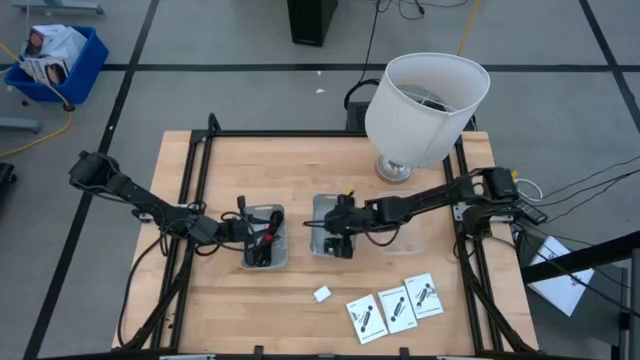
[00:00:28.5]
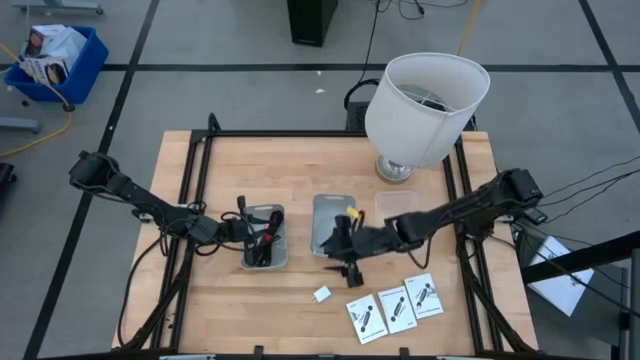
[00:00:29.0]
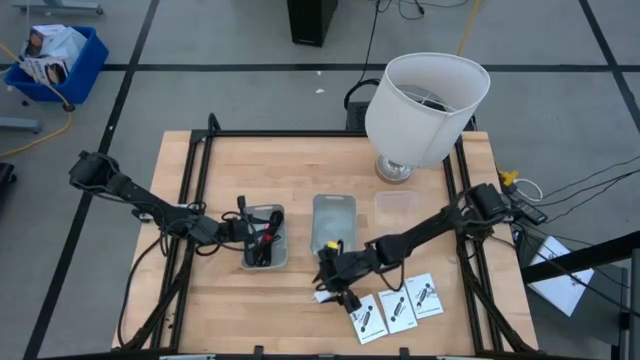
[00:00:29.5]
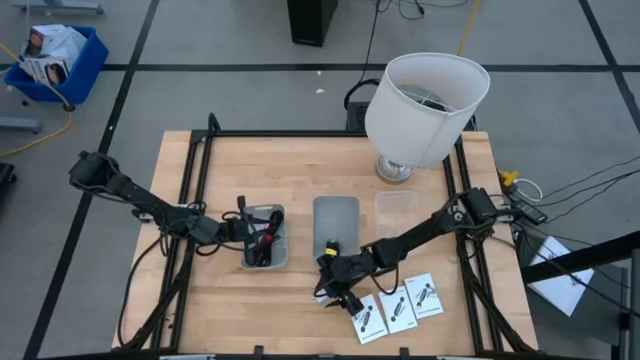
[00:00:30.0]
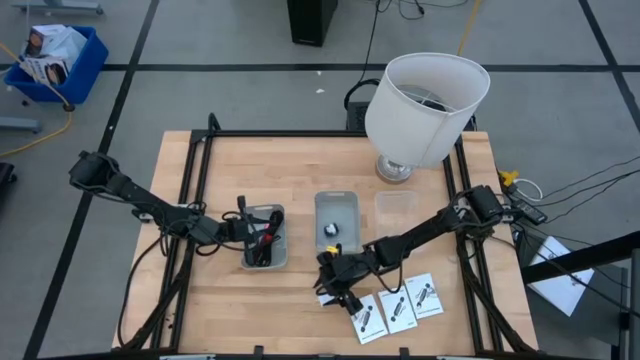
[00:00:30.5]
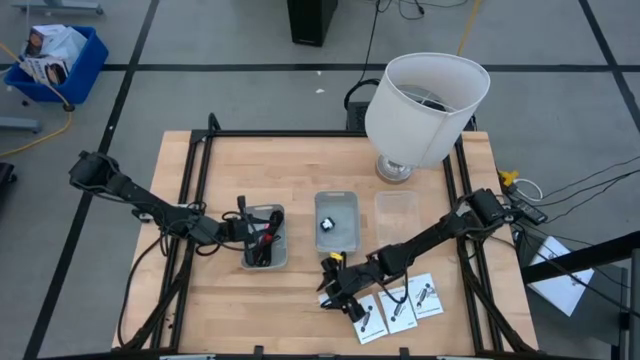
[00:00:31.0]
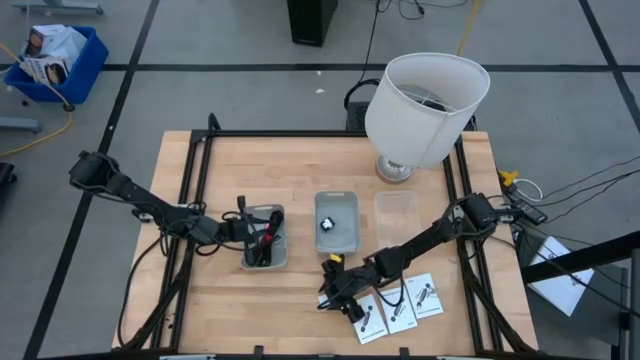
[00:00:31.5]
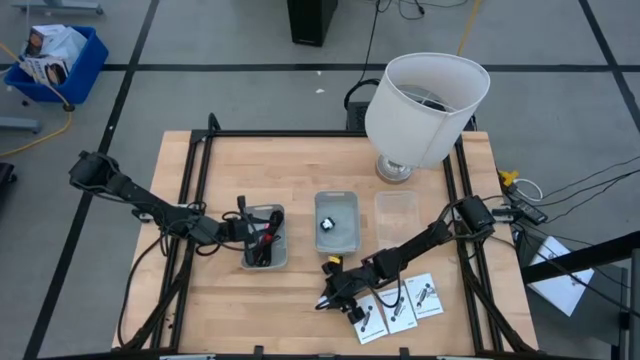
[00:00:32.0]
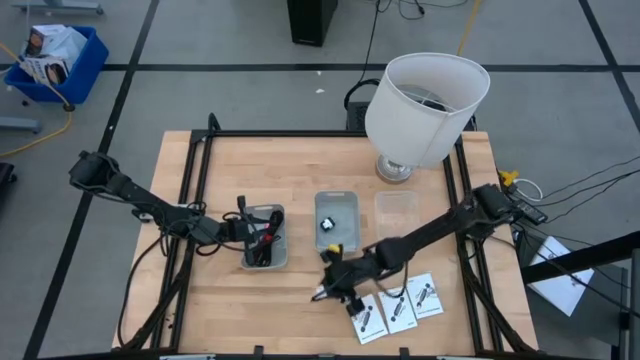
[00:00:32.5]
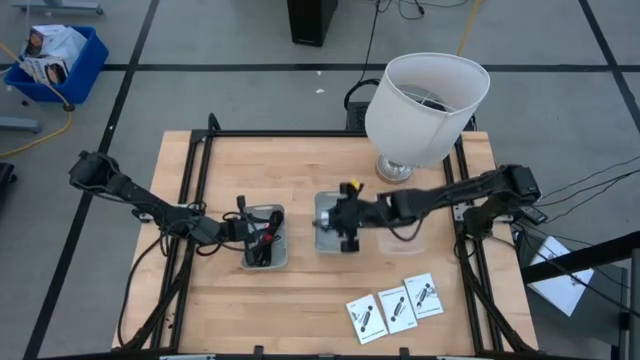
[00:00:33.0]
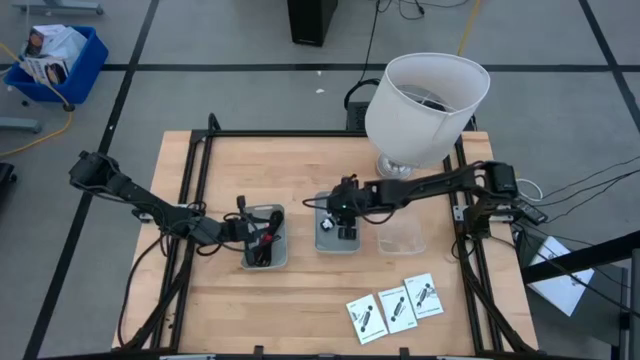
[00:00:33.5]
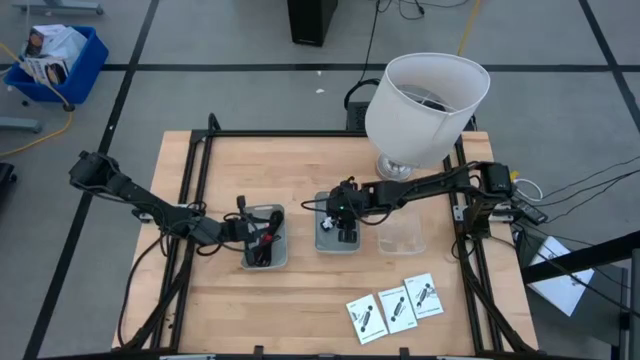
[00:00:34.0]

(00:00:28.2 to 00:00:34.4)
Task: Pick and place items into bin
Put the white charger adapter into the right gray bin

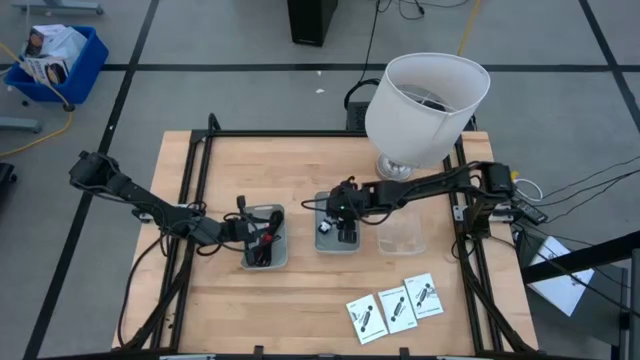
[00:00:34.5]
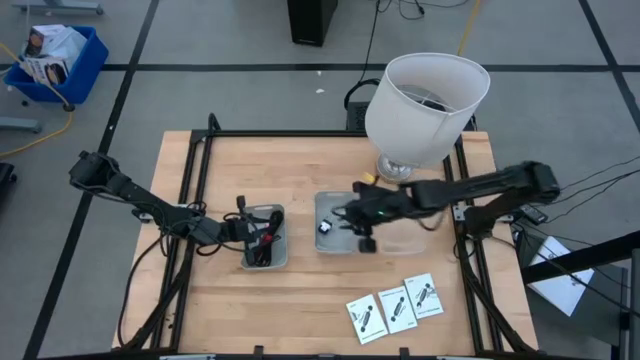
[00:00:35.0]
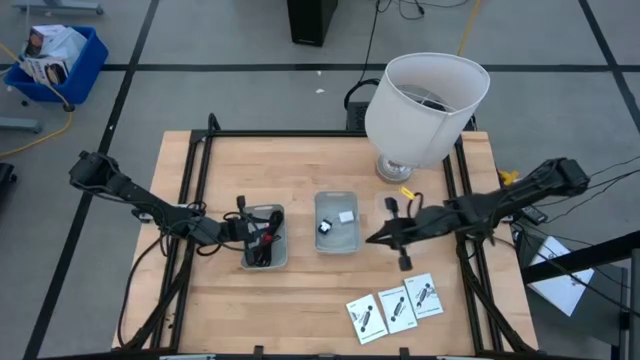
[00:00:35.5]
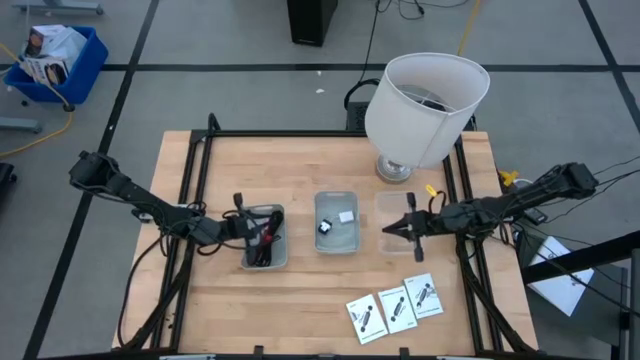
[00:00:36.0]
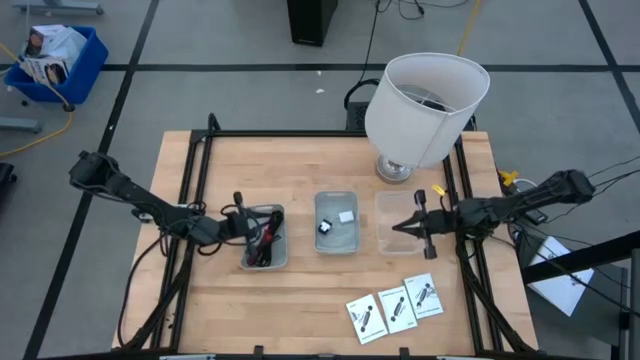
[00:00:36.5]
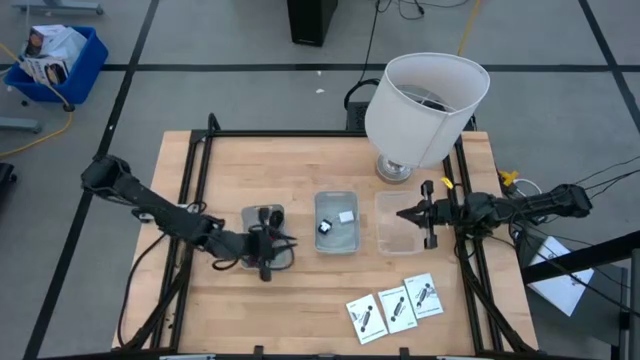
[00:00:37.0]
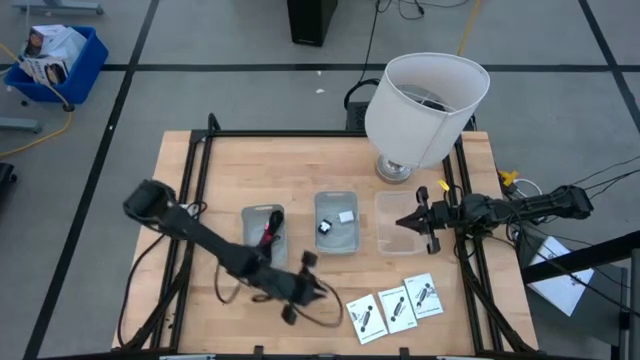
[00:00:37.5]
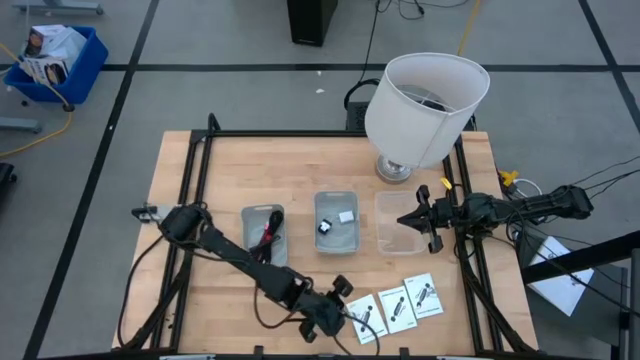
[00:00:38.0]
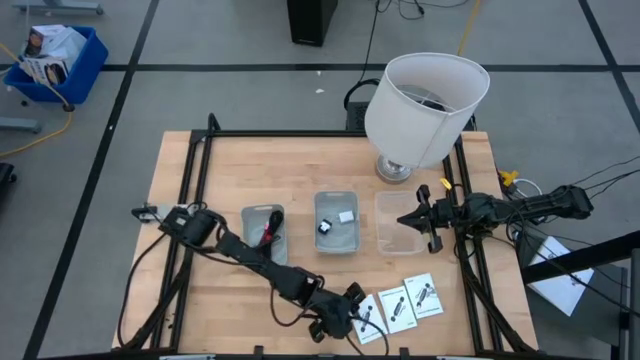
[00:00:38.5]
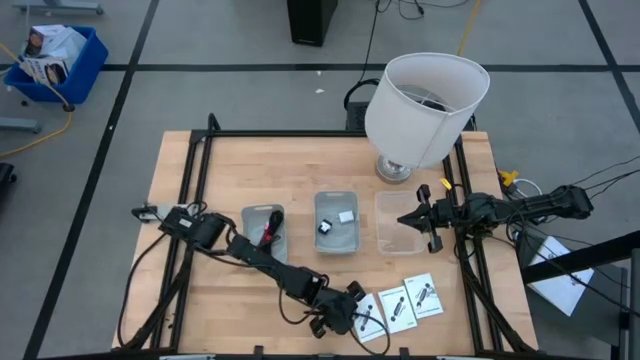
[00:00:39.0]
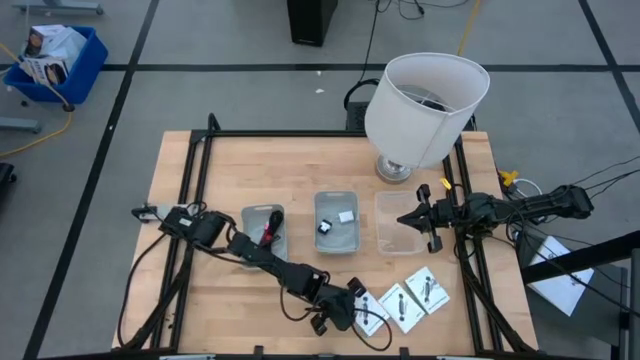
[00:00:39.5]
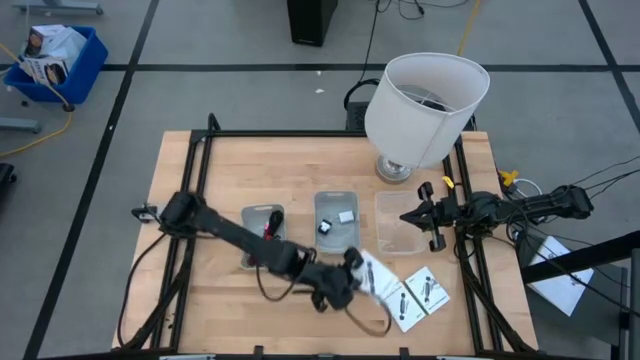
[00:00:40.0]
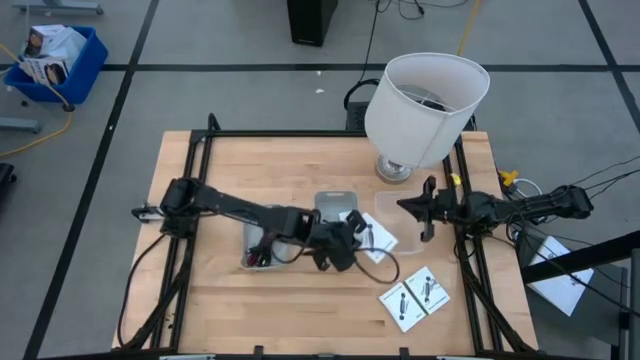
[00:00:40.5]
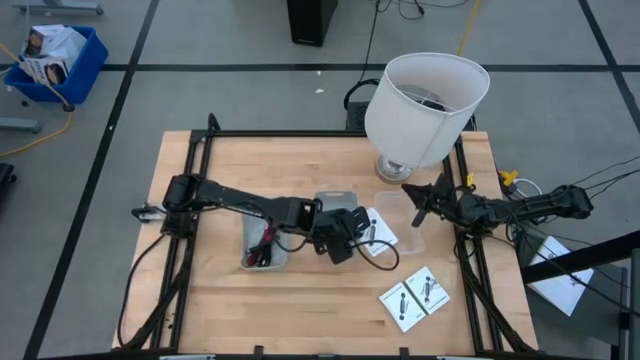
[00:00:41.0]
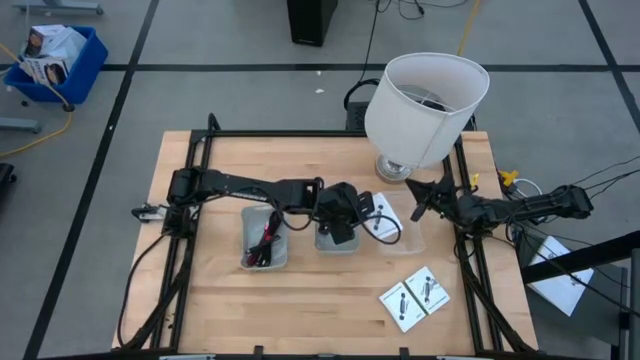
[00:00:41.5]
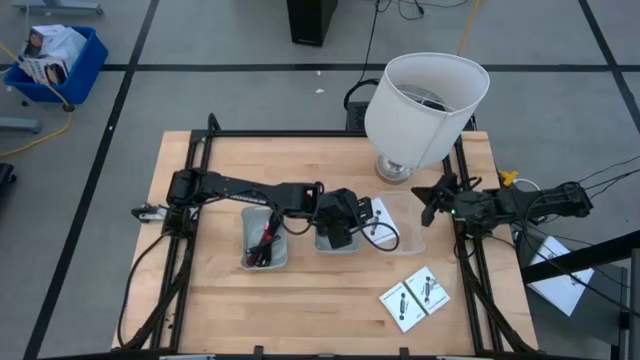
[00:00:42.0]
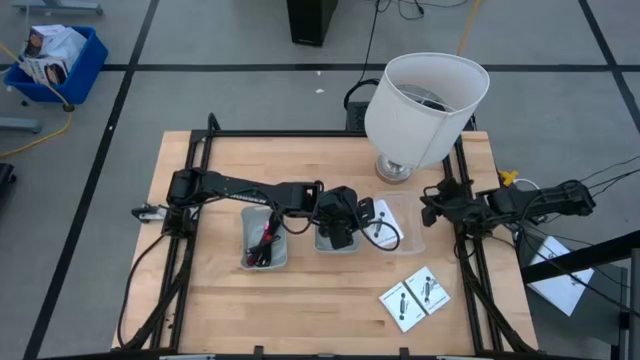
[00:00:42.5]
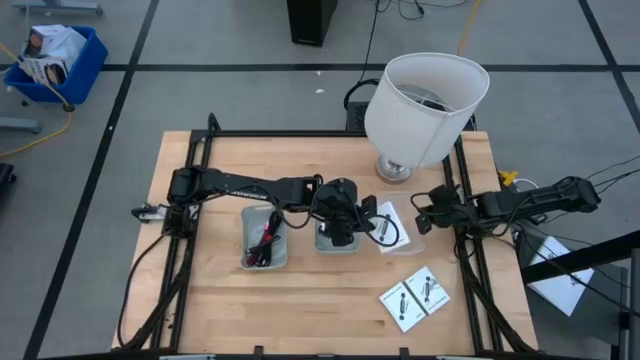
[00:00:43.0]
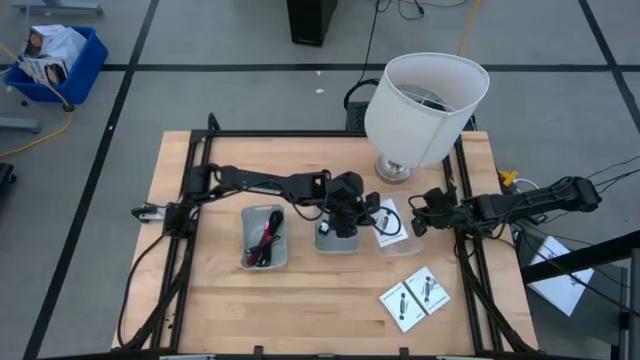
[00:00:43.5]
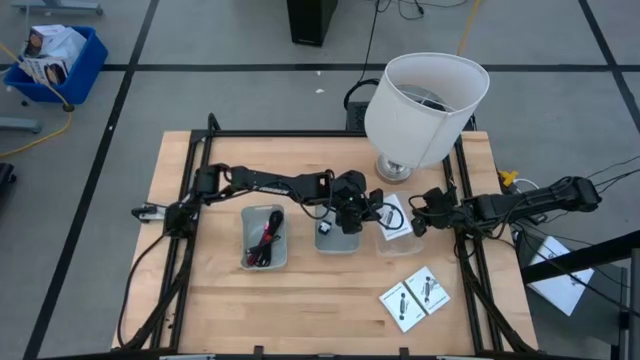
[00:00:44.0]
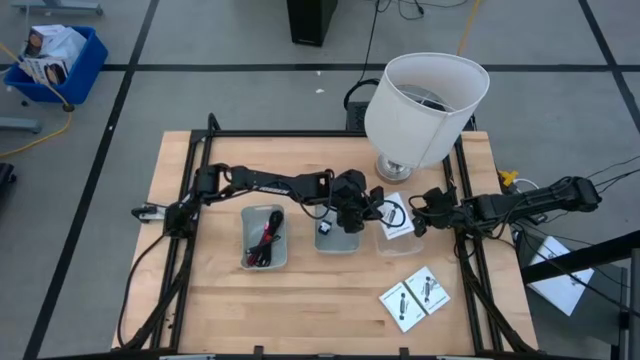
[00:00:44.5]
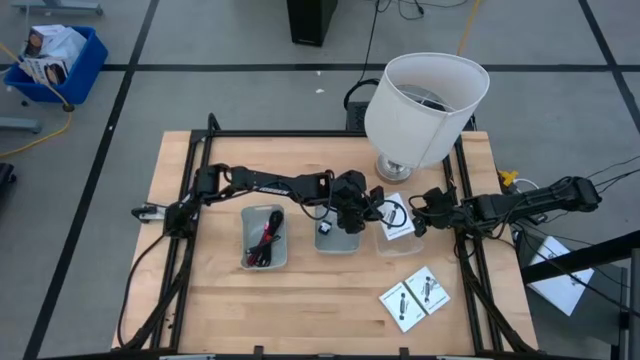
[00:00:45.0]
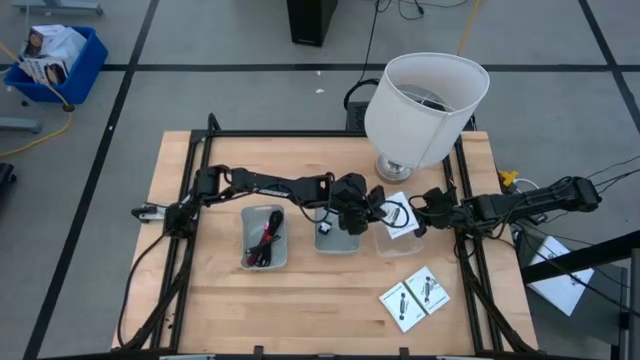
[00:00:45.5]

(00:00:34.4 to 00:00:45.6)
Put the left white card reader box into the transparent bin

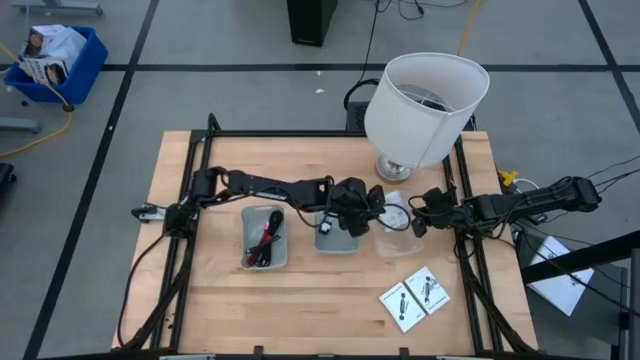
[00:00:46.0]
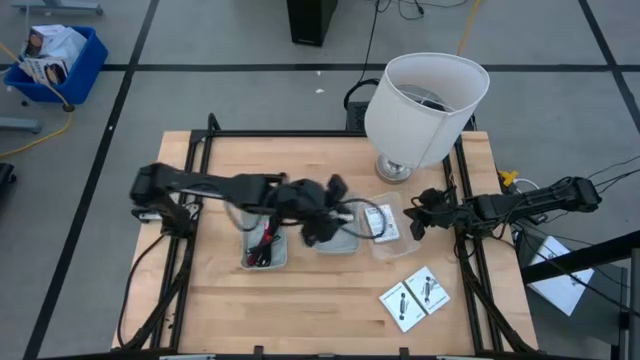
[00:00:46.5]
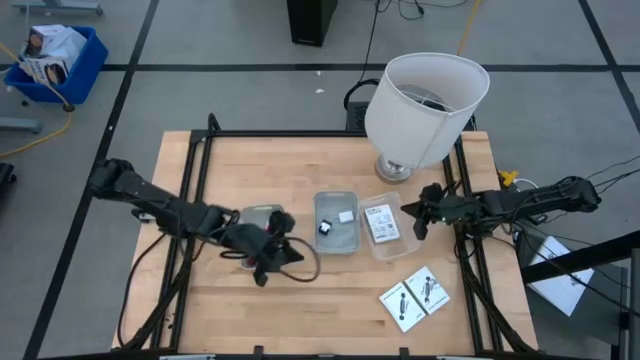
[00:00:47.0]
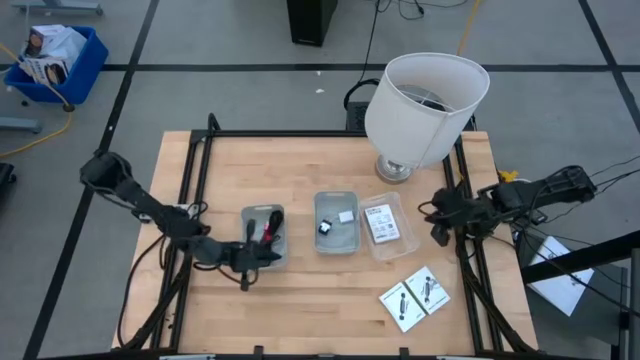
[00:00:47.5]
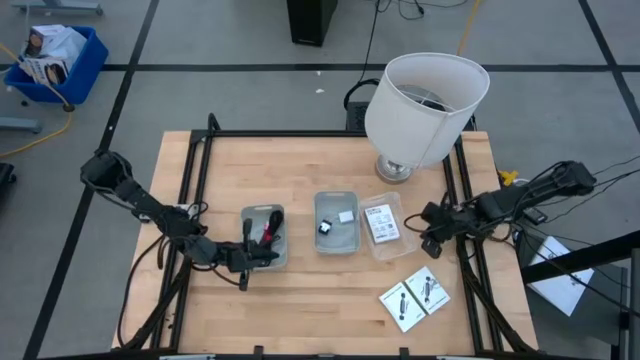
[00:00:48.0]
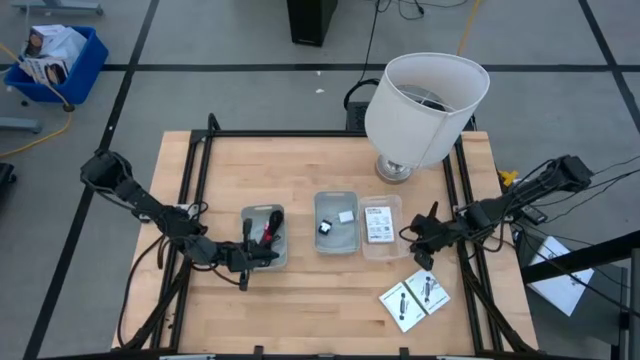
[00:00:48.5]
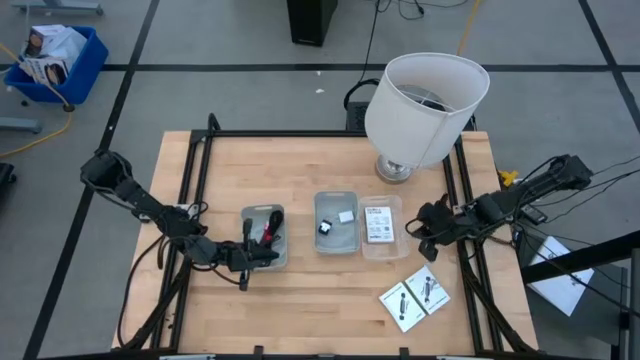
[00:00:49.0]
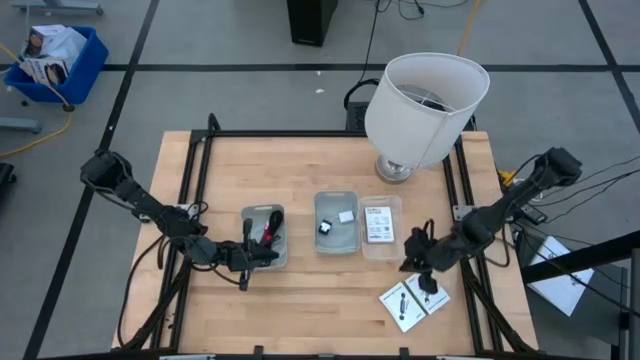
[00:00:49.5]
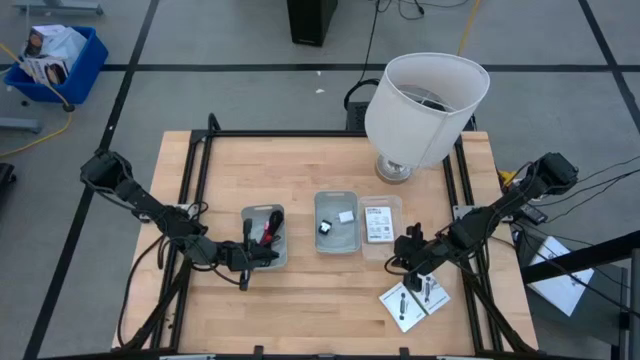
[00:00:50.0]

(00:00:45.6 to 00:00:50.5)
Adjust the transparent bin
